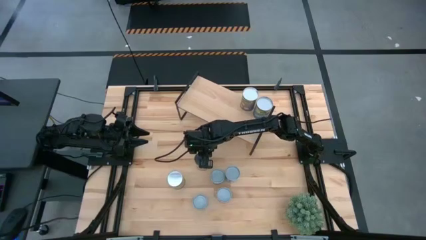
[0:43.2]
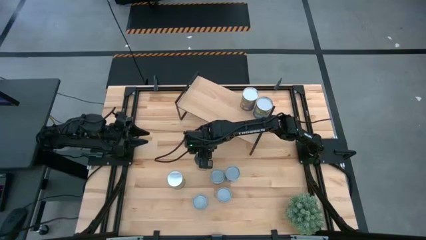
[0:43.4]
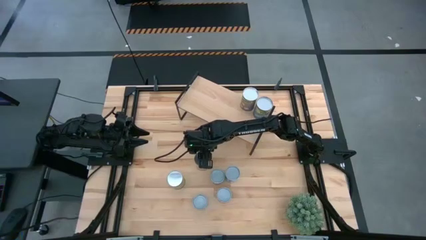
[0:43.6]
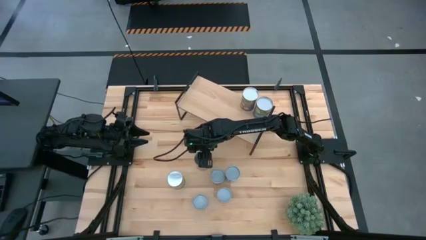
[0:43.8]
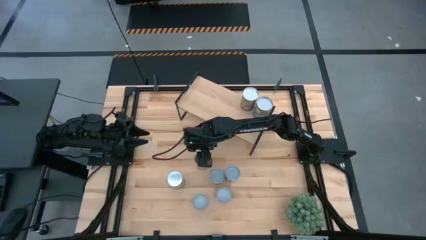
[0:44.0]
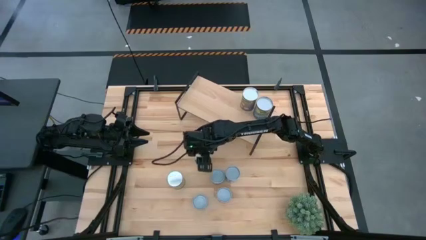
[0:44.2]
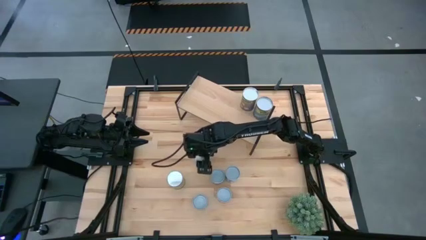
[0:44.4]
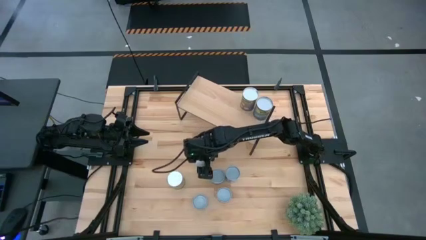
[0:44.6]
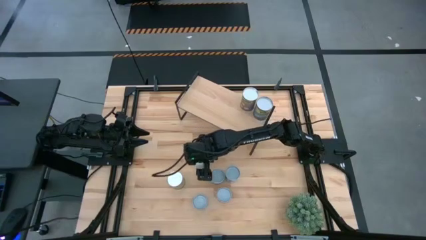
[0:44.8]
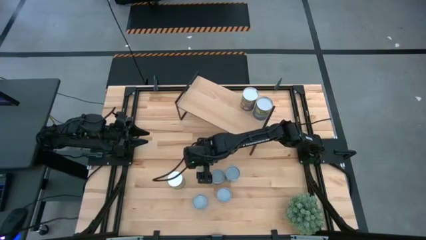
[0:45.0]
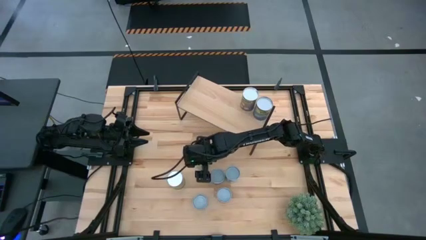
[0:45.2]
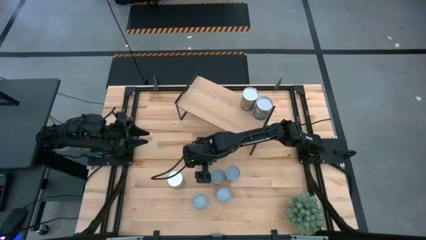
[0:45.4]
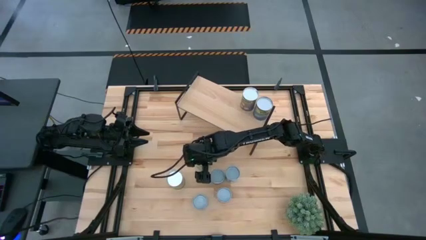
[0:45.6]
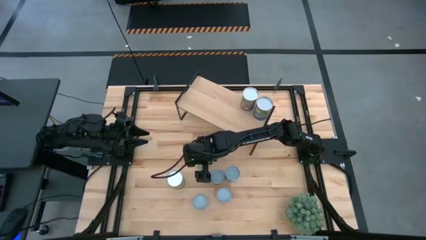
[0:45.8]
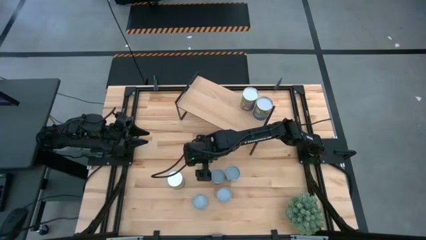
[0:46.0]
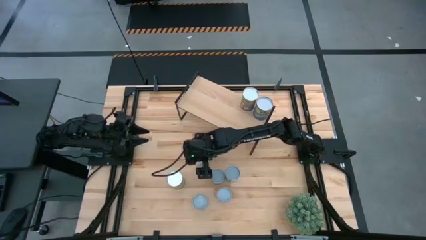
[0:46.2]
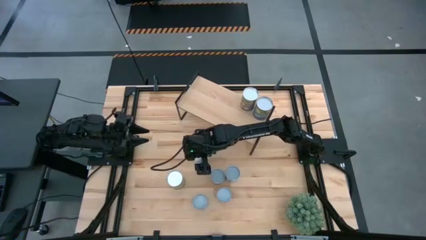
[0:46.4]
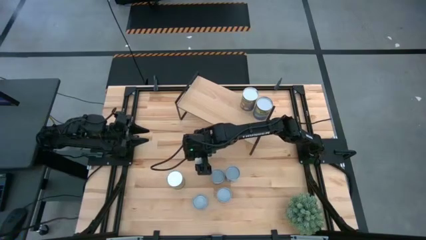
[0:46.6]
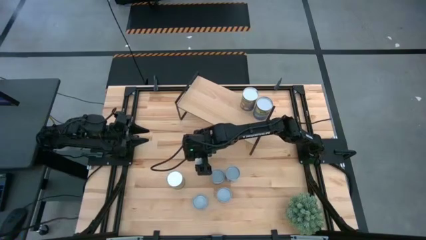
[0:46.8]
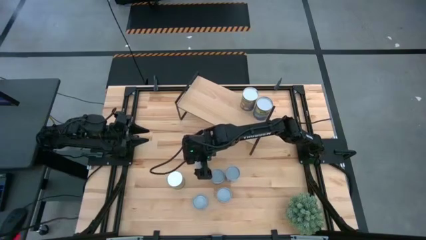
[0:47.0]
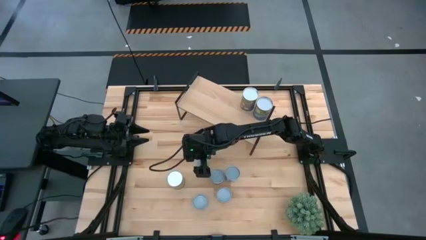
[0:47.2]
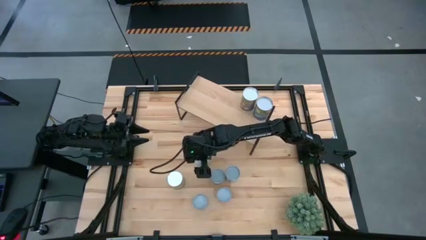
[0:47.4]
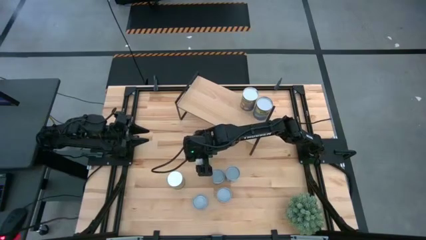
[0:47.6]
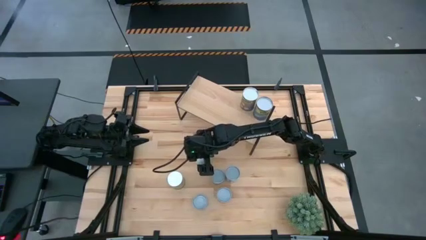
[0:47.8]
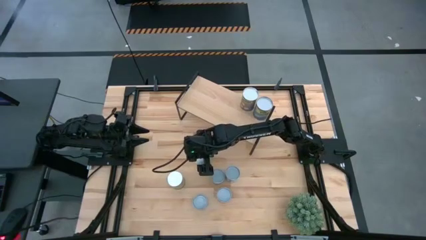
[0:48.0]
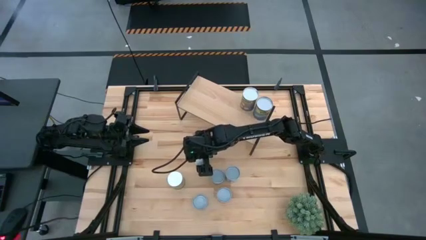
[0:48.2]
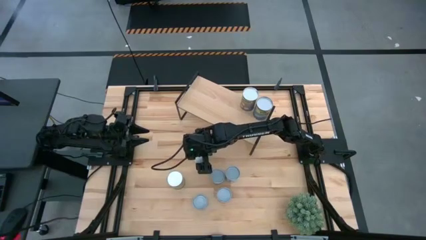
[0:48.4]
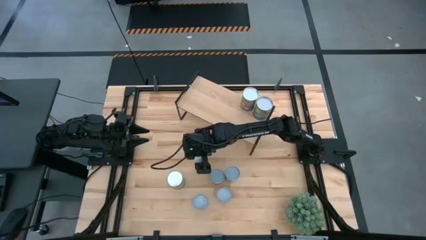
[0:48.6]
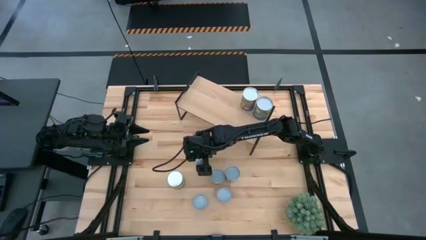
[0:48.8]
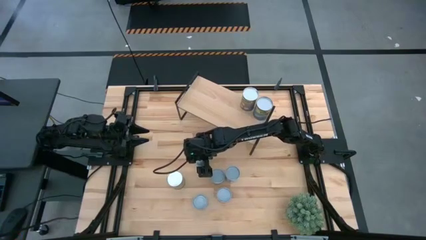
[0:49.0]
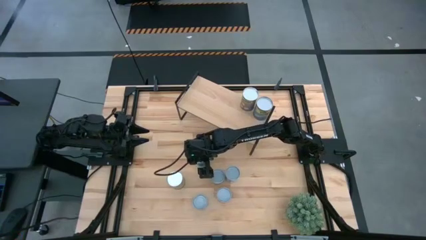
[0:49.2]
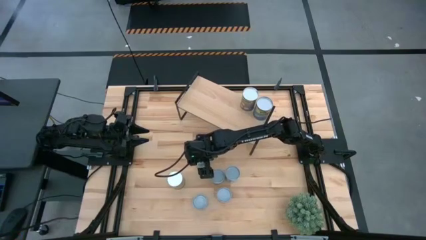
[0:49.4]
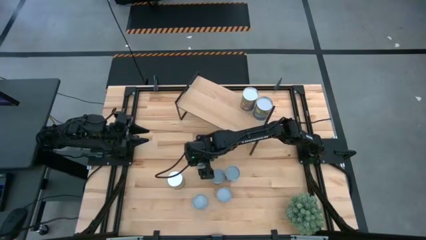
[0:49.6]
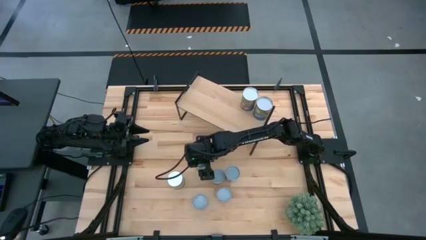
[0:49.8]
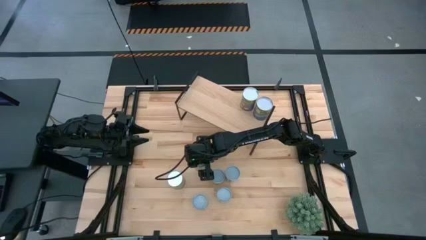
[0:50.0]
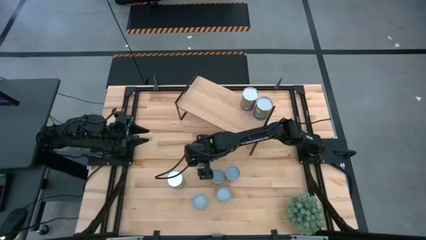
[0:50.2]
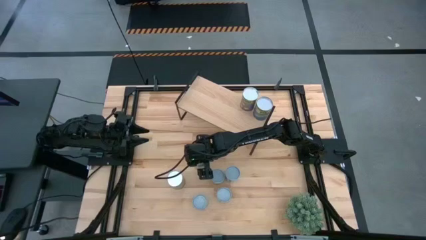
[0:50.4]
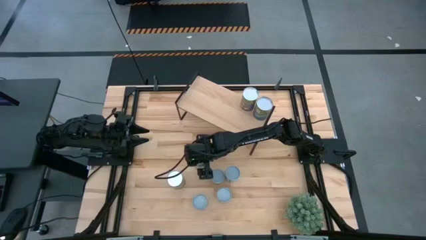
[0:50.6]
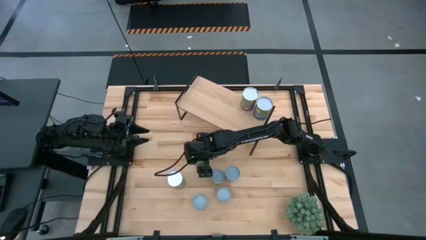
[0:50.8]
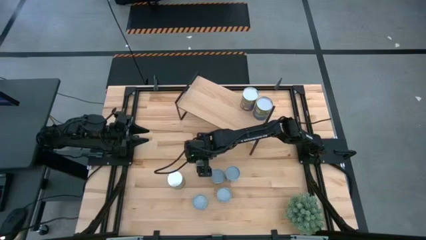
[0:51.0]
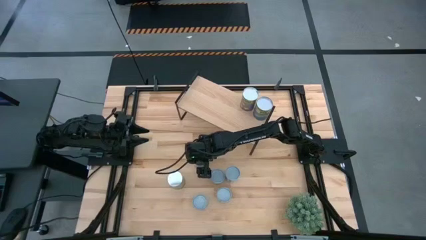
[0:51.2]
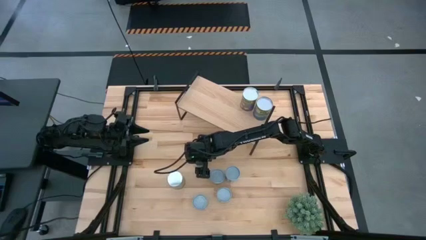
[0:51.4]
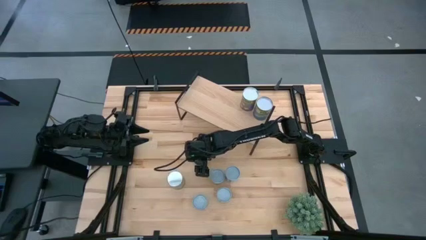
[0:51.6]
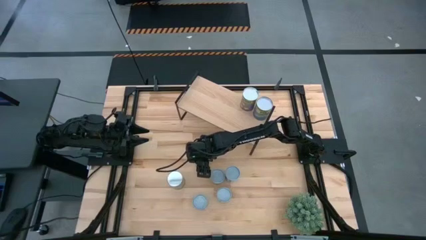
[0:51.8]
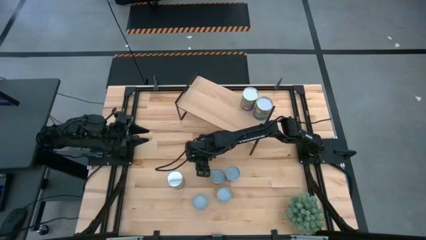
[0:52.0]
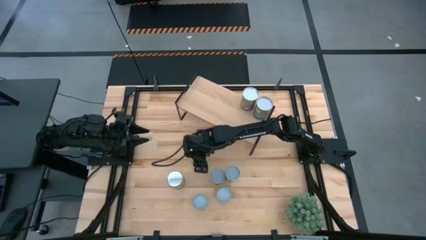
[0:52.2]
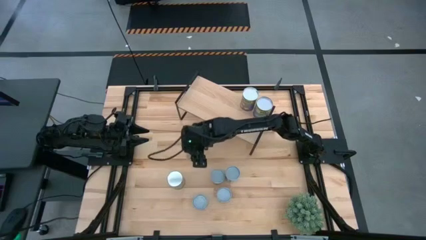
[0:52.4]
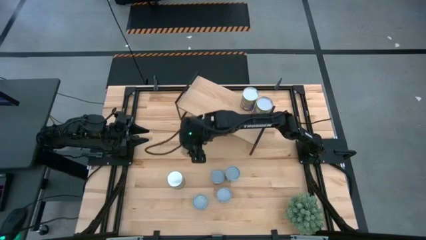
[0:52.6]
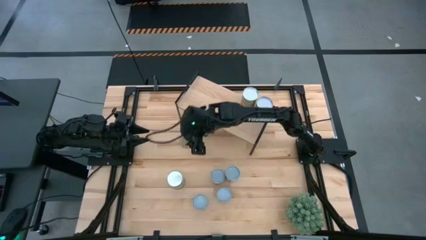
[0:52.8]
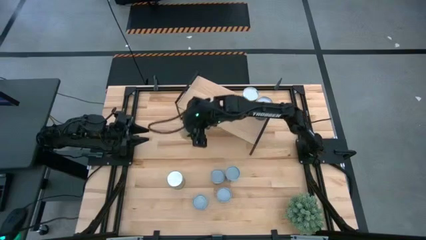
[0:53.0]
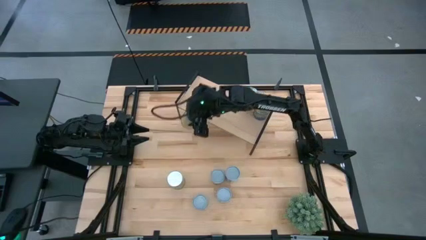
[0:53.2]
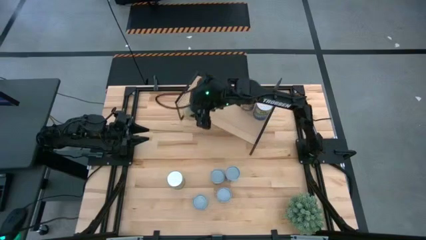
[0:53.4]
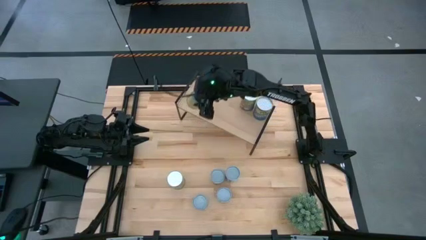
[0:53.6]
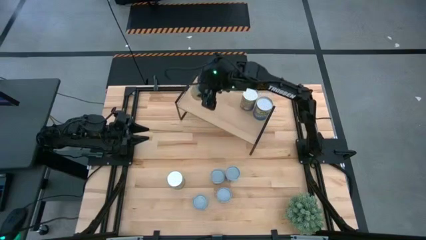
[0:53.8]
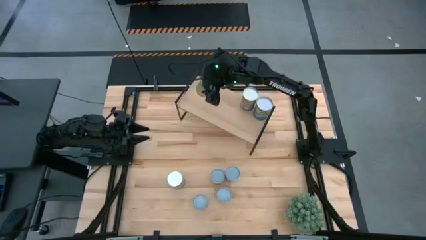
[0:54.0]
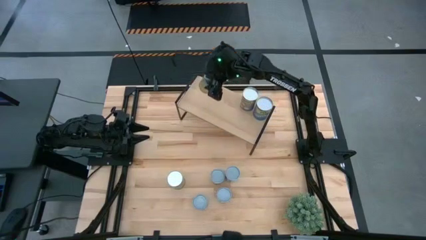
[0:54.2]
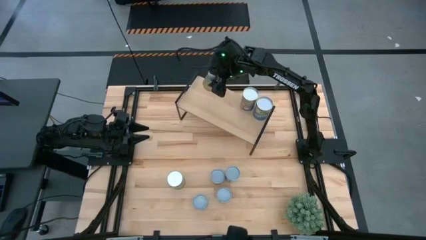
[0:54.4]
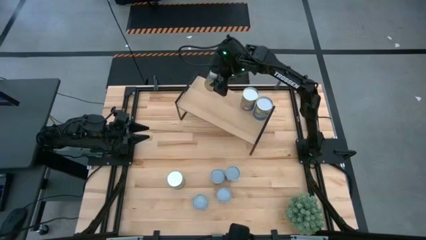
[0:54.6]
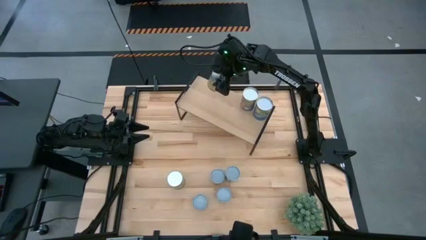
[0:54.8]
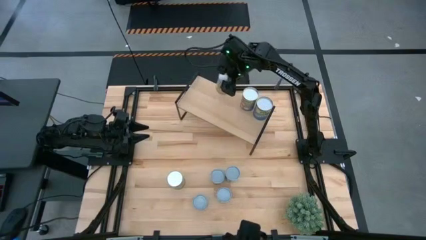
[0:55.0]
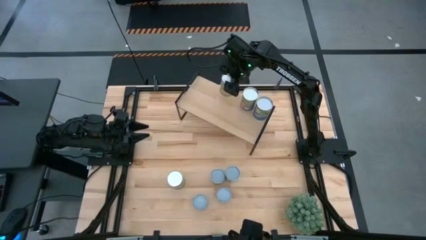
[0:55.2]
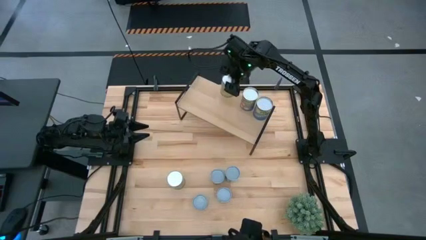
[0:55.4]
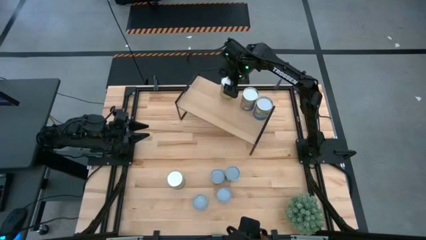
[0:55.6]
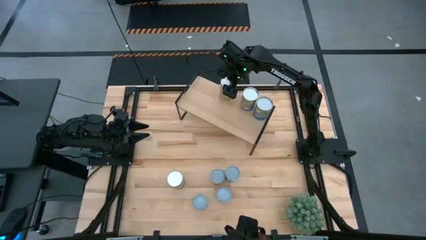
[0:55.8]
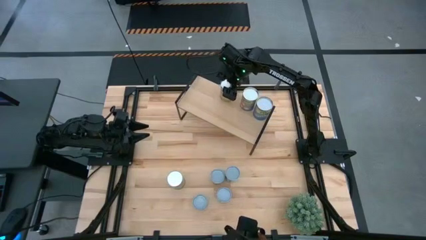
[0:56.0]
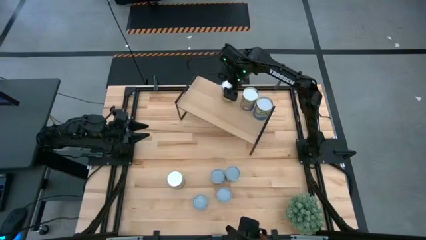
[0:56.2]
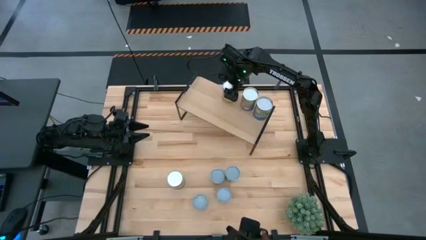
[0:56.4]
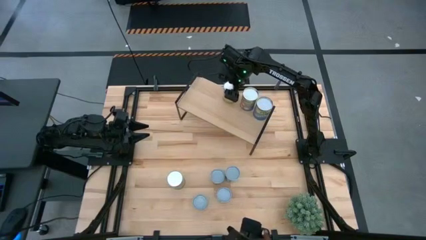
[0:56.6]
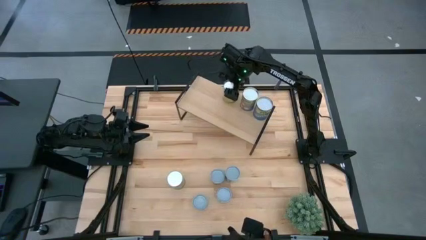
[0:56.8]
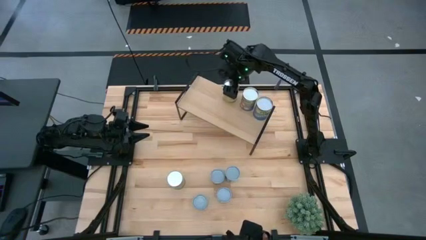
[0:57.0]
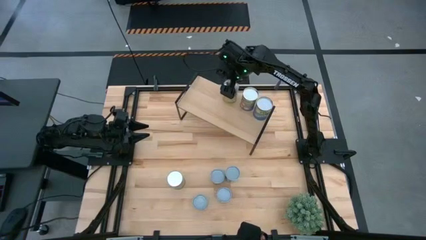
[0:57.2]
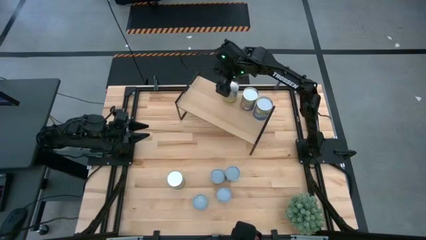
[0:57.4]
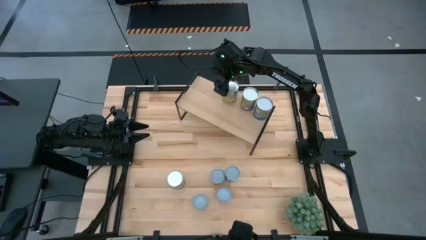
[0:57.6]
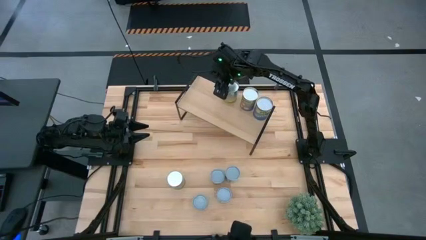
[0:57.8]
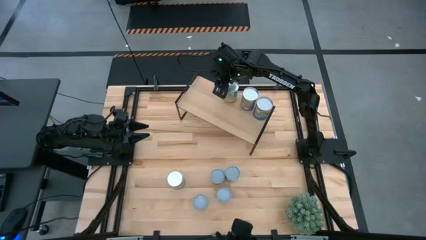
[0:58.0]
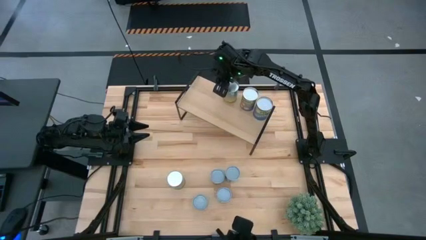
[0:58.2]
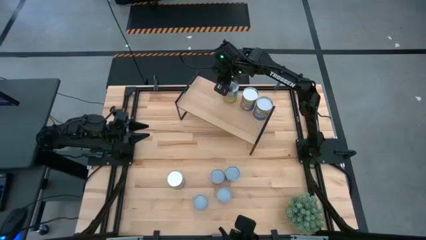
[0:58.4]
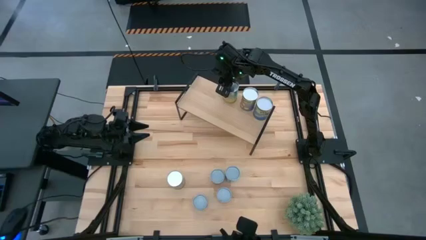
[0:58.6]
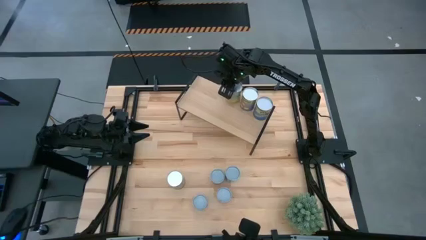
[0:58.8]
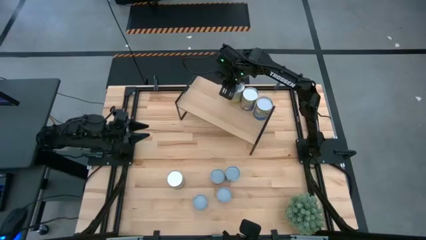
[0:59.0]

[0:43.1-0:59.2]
Task: Pick and place cans onto a shelf
Put the canned carrots on the shelf
